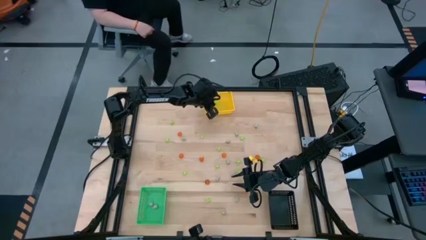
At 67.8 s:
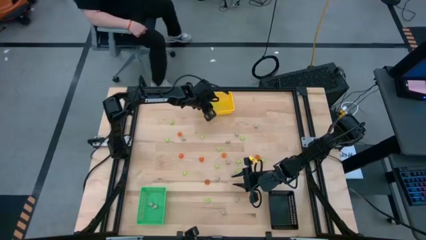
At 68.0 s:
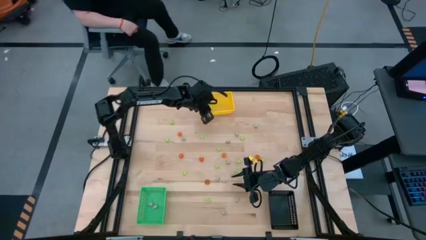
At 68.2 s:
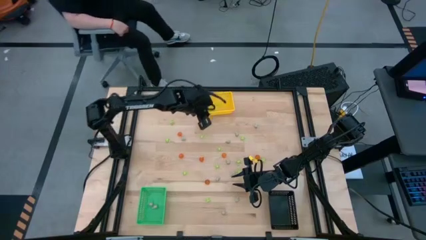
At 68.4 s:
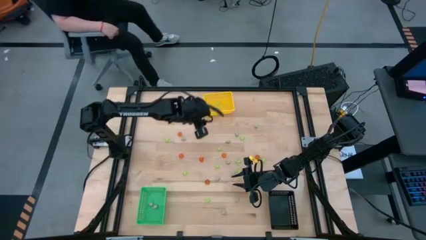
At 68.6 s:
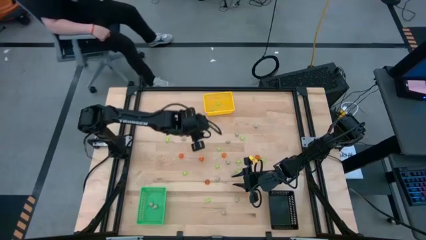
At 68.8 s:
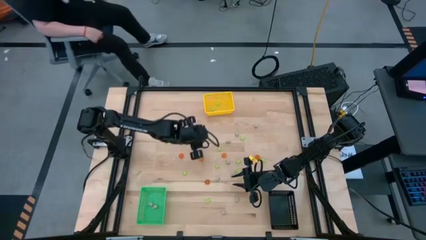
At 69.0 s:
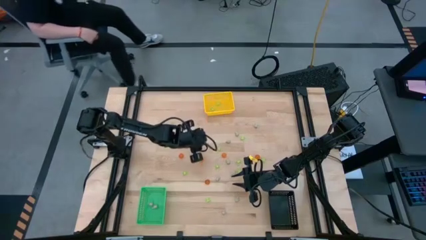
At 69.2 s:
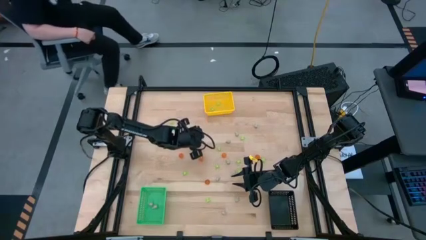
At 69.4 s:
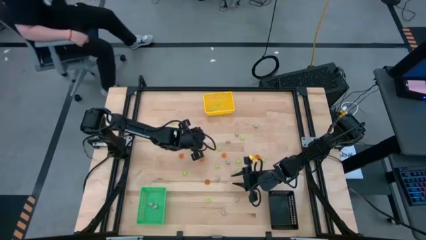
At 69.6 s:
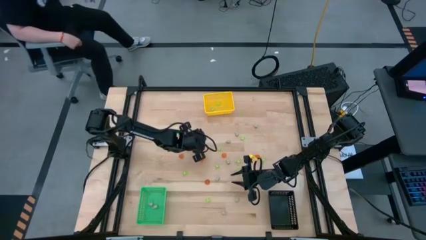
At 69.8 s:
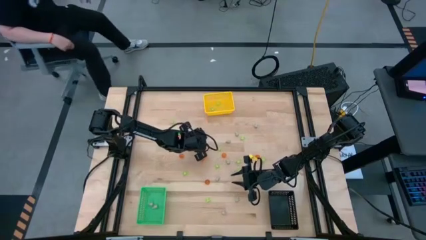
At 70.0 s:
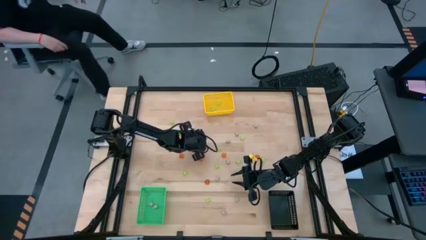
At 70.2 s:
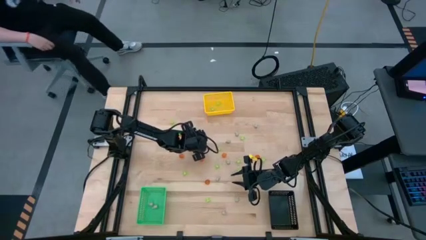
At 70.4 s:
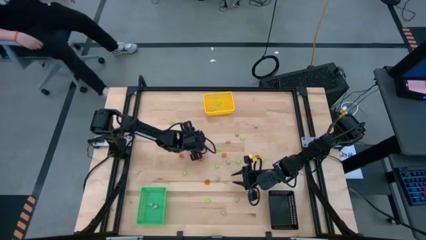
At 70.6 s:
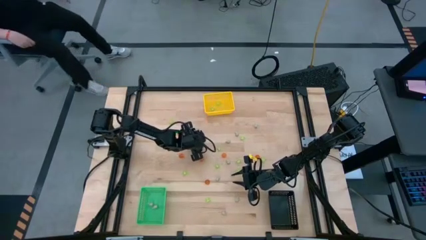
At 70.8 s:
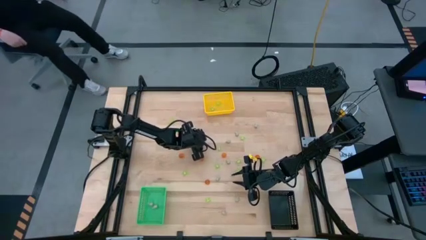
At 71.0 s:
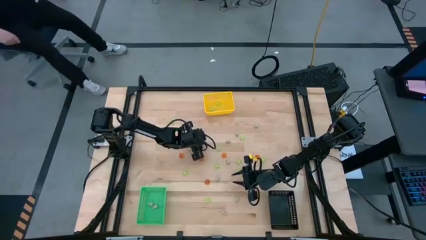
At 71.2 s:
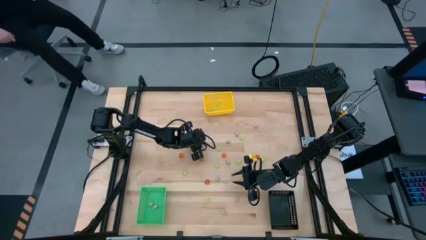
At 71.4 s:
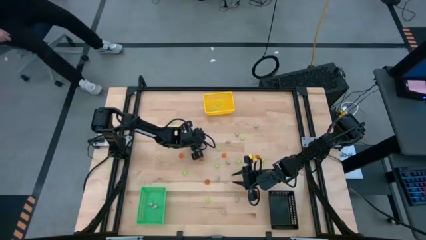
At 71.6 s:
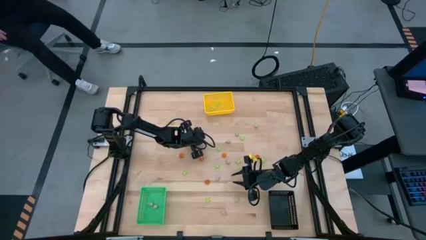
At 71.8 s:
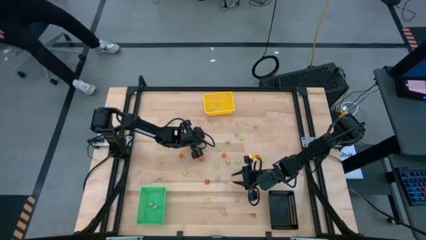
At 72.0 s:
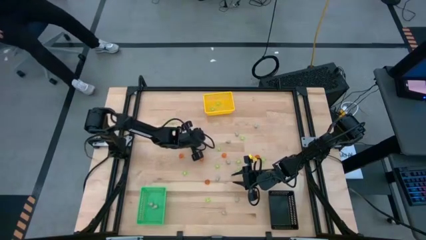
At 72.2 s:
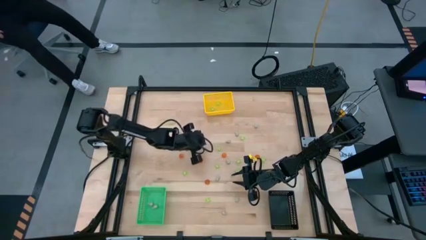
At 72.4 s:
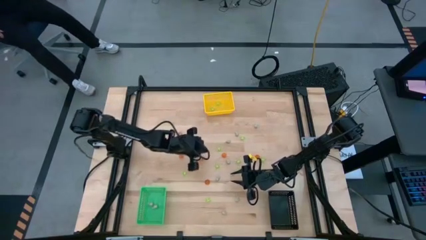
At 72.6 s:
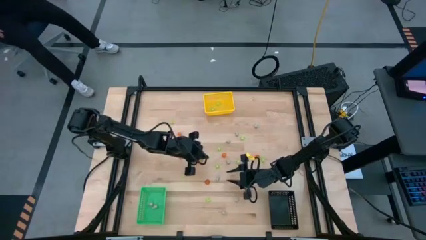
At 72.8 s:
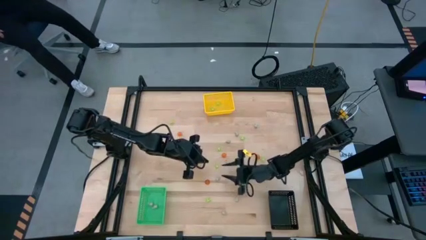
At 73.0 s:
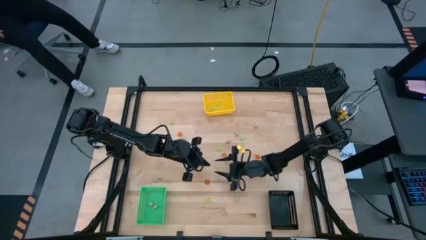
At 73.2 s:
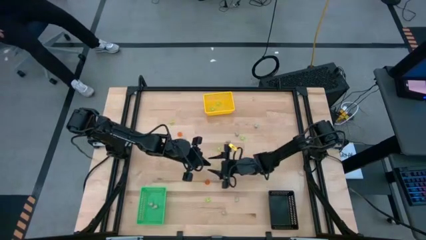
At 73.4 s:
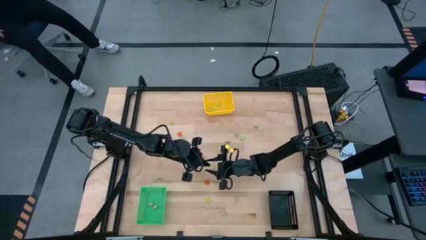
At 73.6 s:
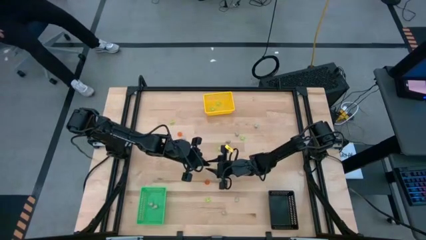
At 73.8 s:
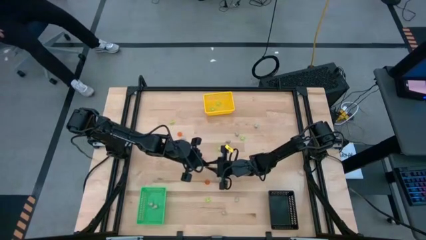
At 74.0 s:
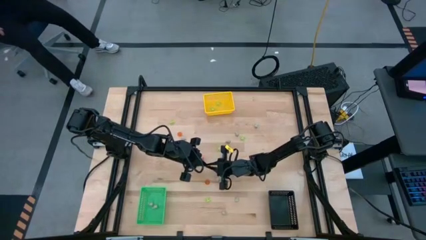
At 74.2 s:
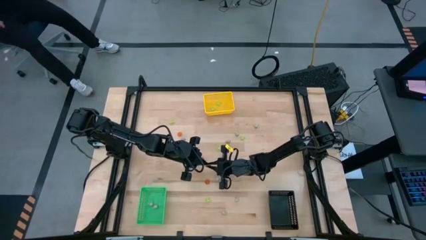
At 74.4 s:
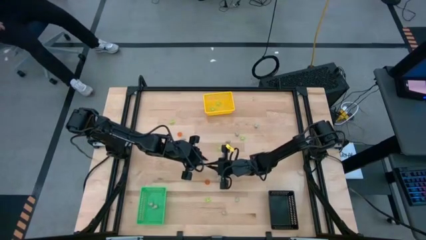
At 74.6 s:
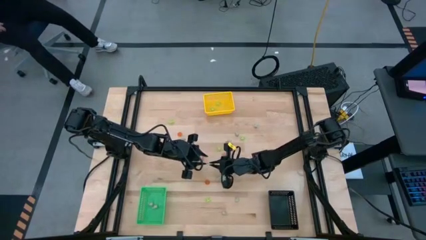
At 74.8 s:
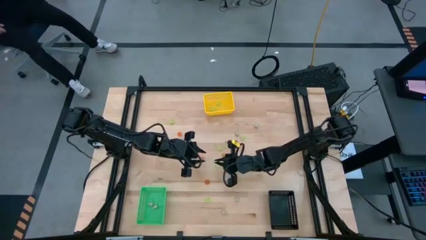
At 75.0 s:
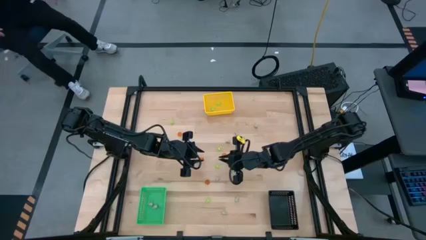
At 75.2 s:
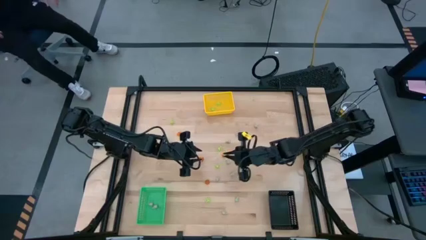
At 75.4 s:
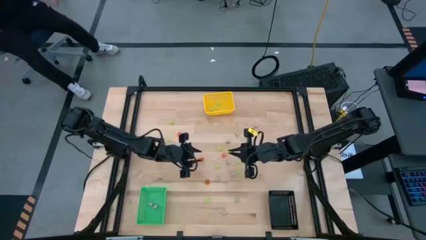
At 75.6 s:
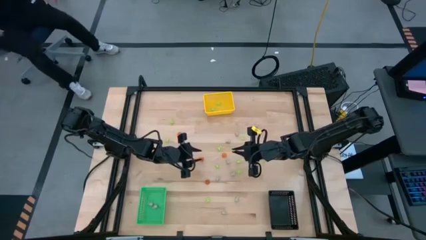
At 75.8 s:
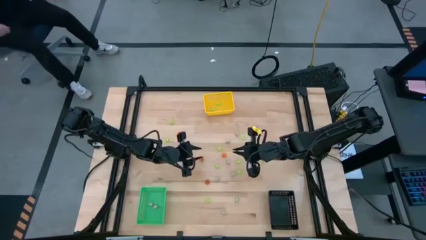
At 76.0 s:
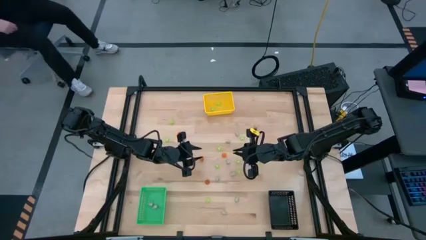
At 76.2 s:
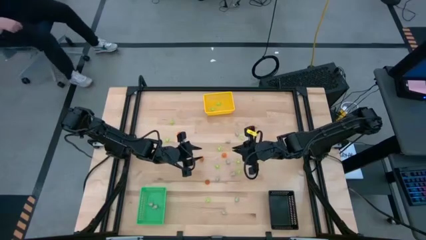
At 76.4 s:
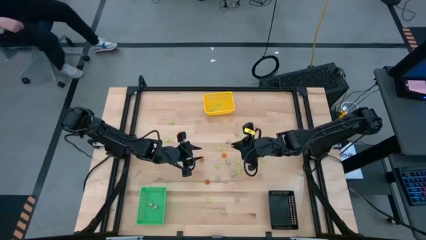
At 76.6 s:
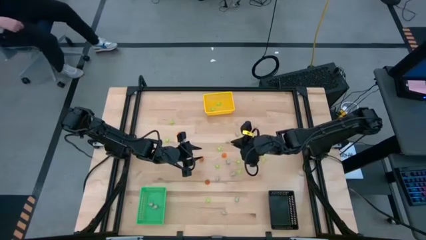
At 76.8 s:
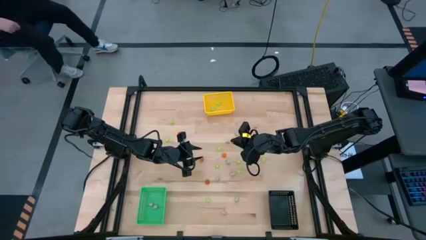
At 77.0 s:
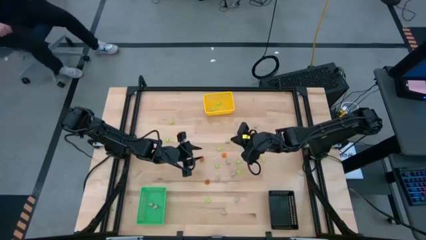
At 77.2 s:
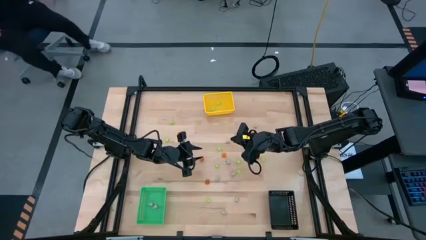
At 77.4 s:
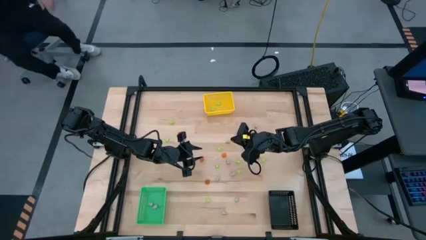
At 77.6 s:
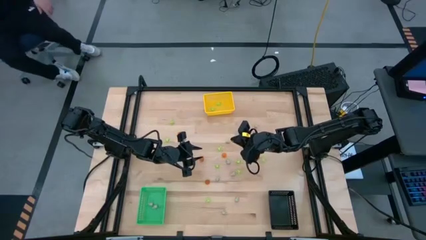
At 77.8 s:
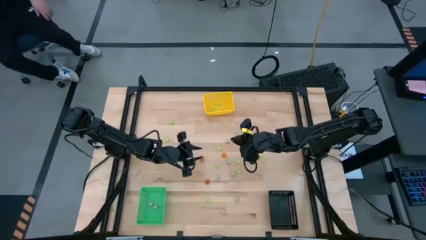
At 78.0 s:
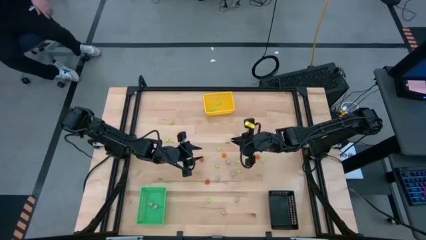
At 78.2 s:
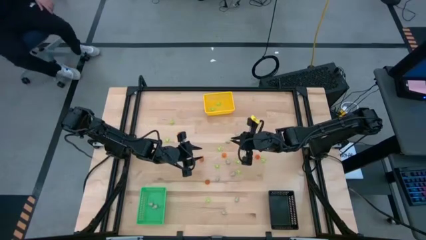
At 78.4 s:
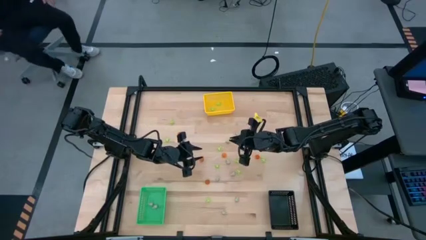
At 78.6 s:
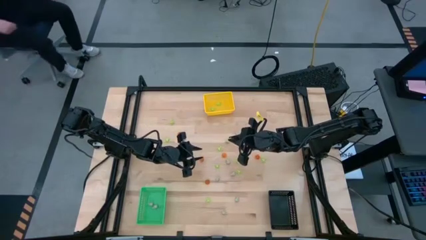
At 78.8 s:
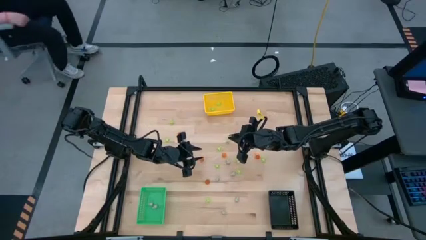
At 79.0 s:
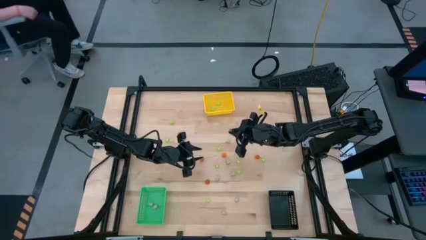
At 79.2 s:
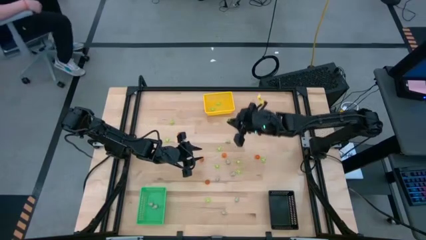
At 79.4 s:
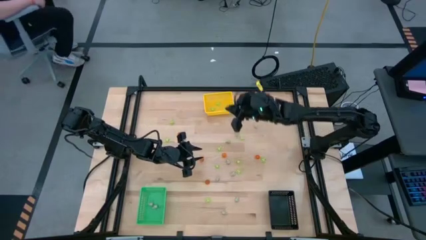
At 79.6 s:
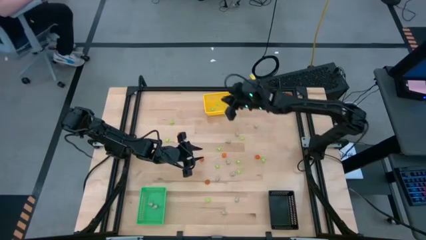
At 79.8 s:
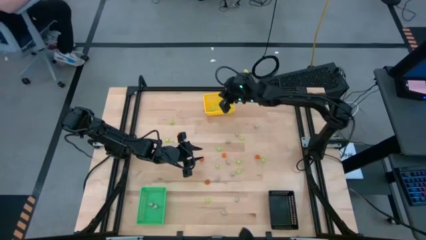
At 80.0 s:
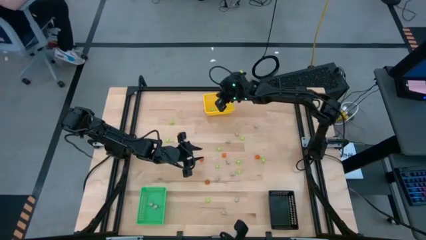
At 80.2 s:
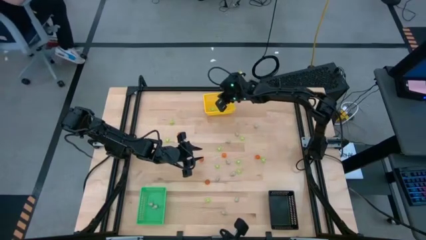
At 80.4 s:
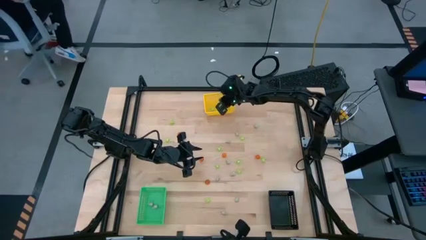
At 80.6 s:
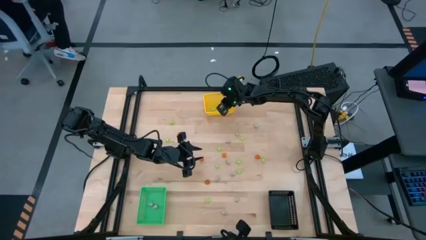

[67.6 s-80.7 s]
Task: Sort Halloween decoration
Put the green spider toy into the yellow bin
